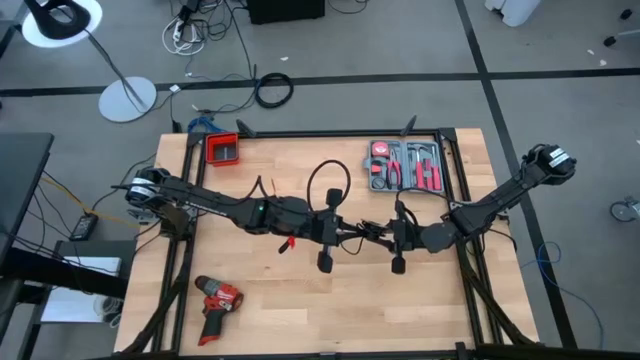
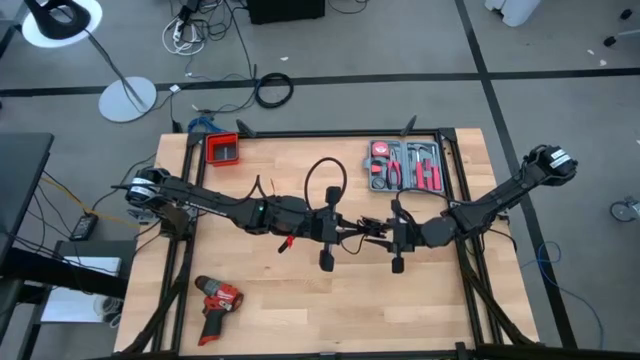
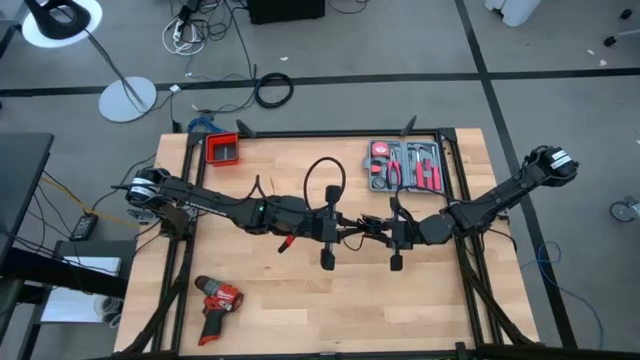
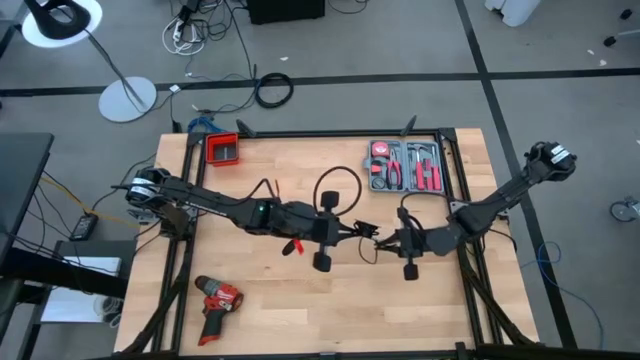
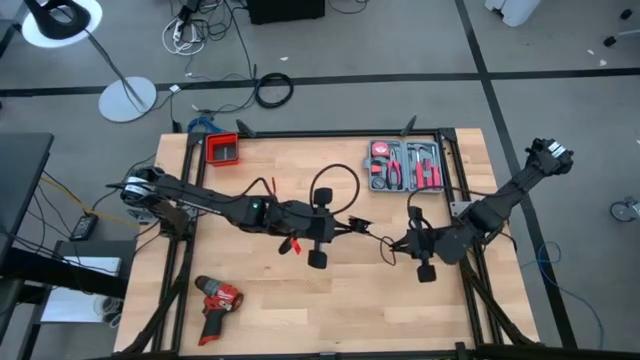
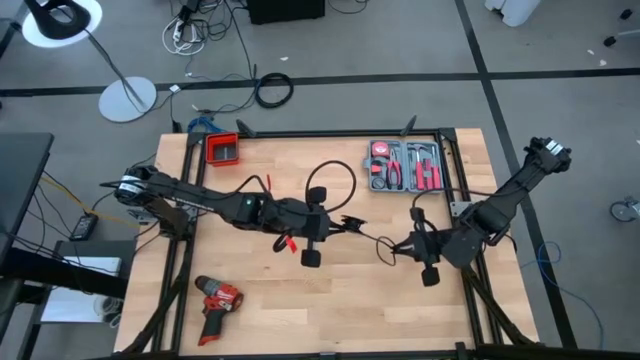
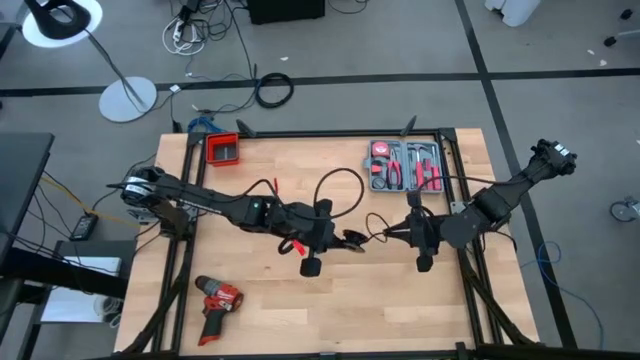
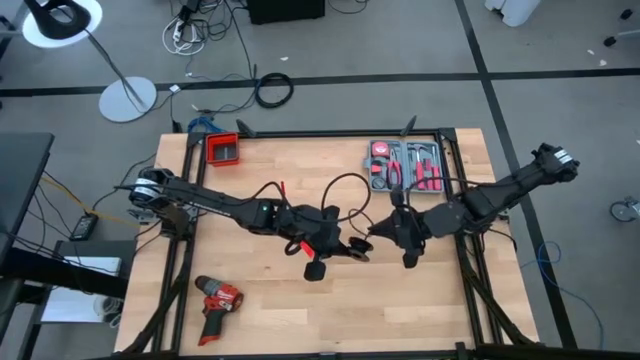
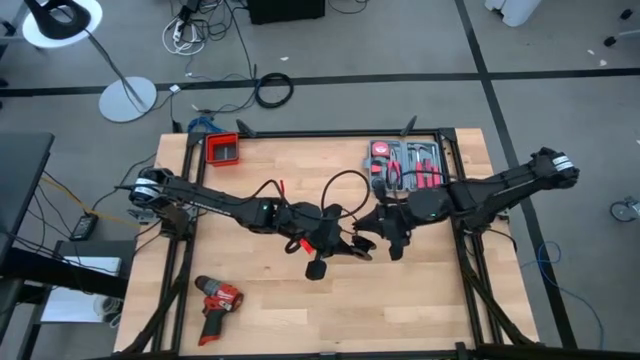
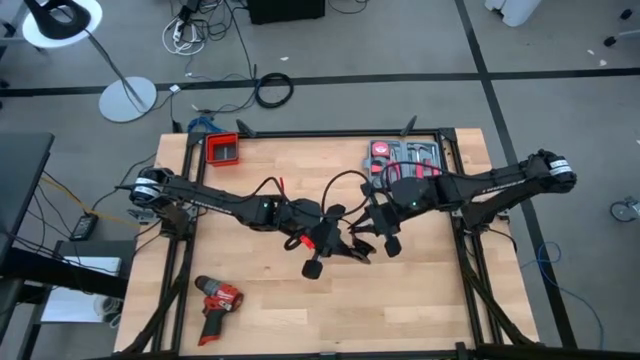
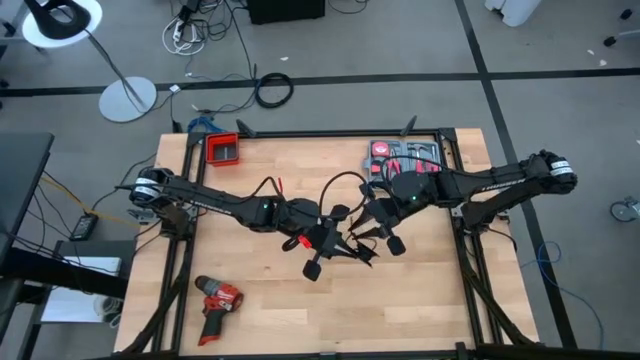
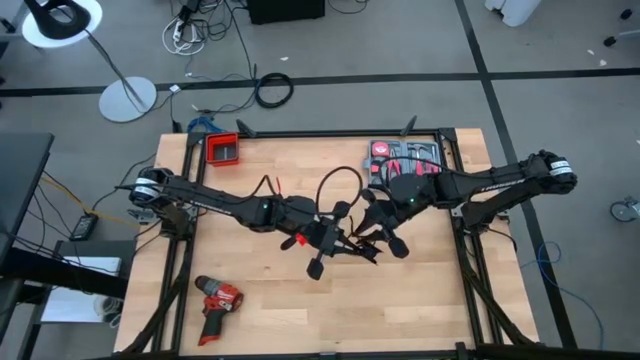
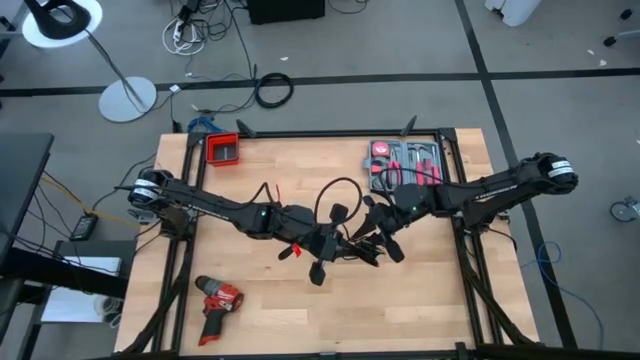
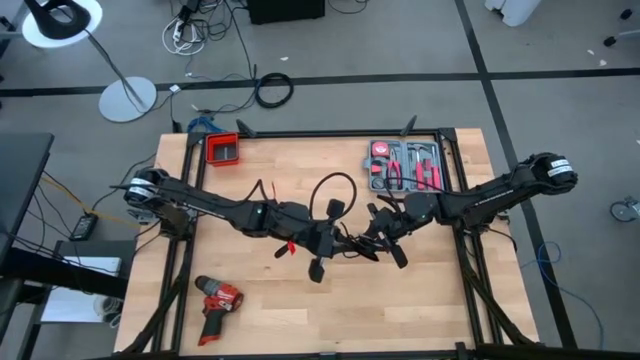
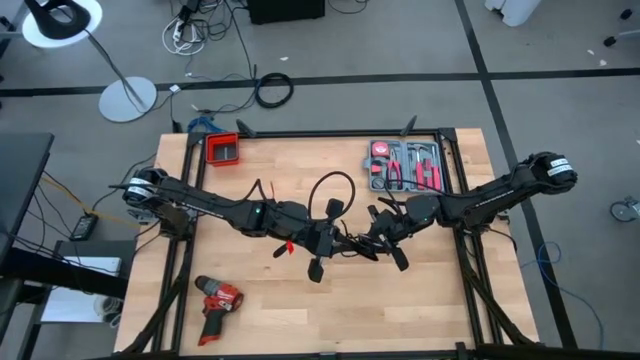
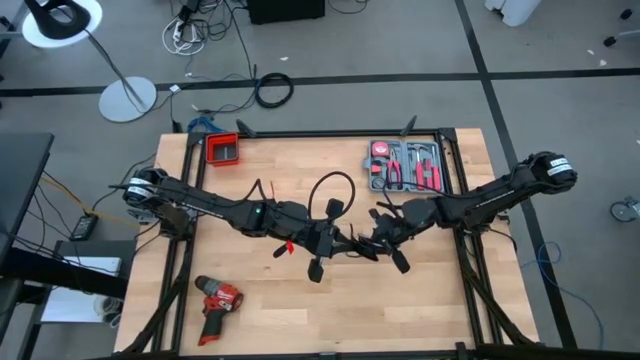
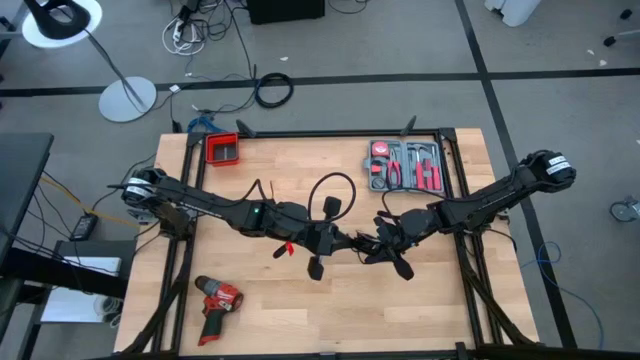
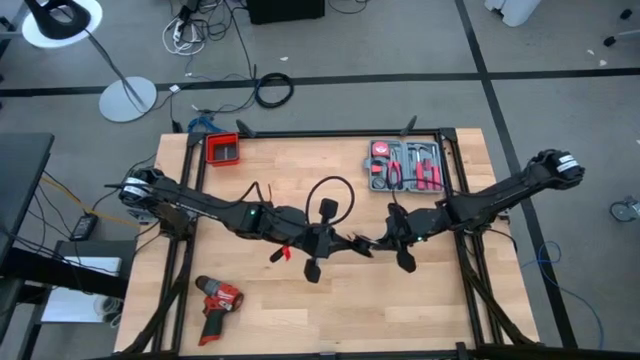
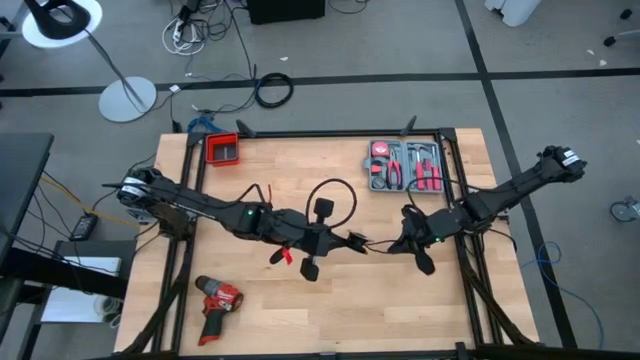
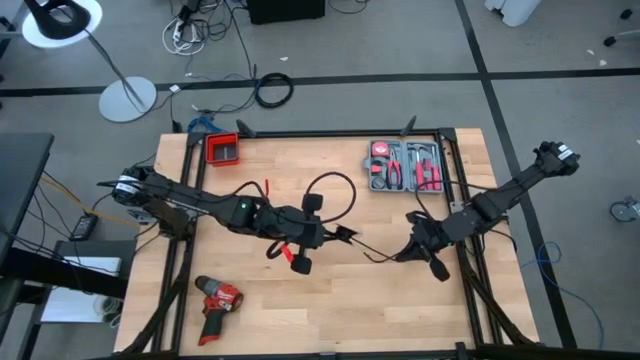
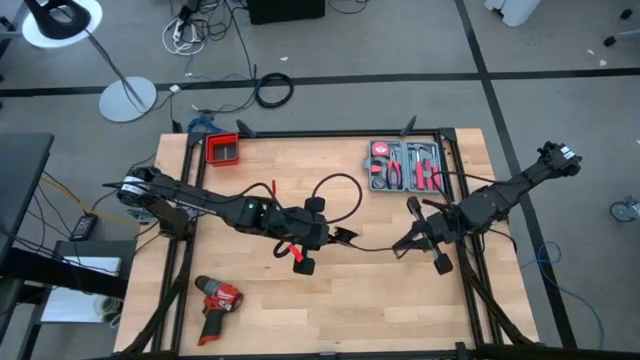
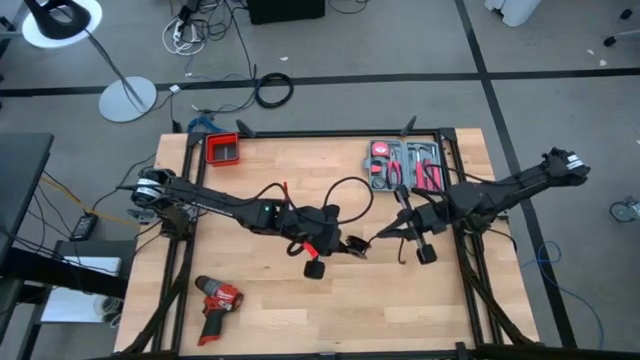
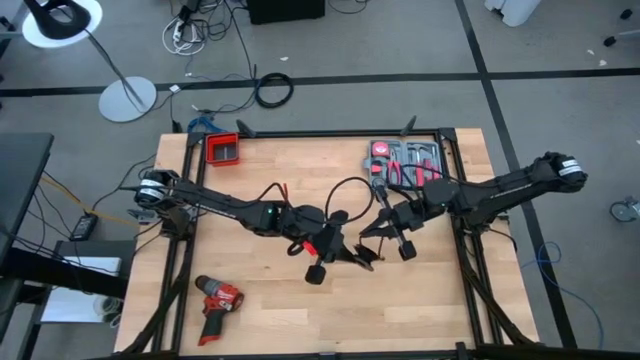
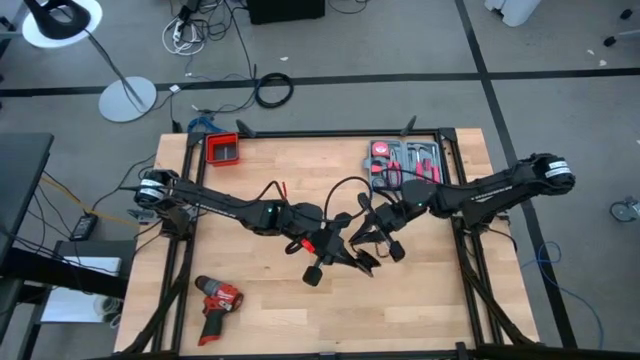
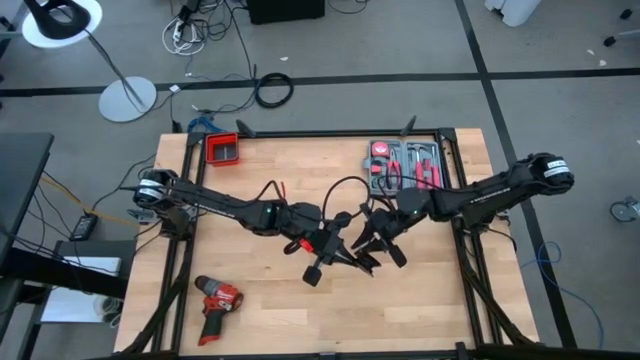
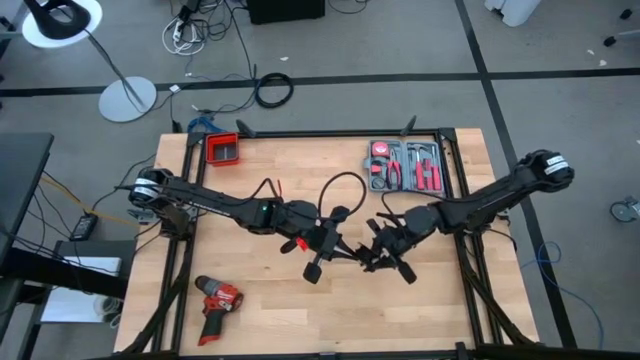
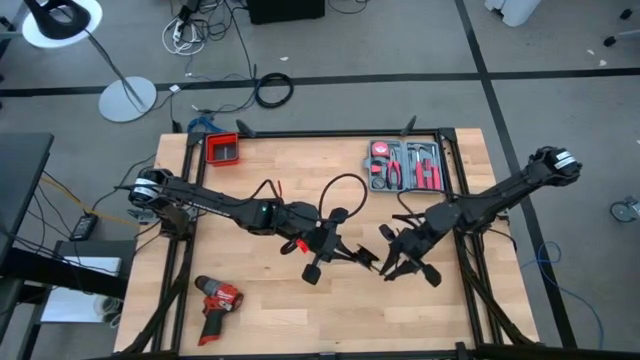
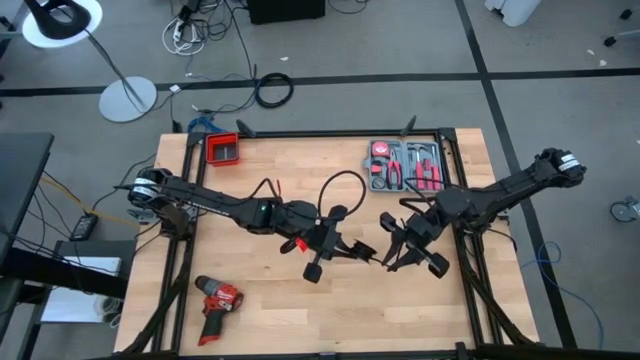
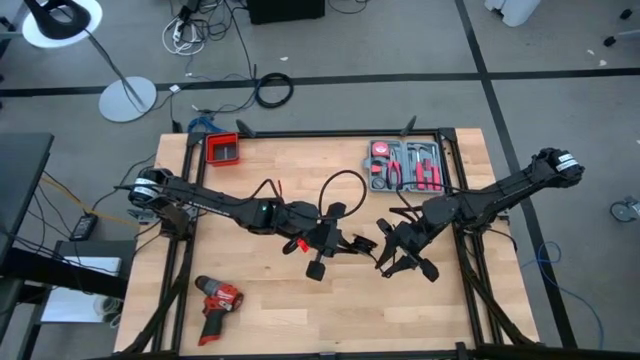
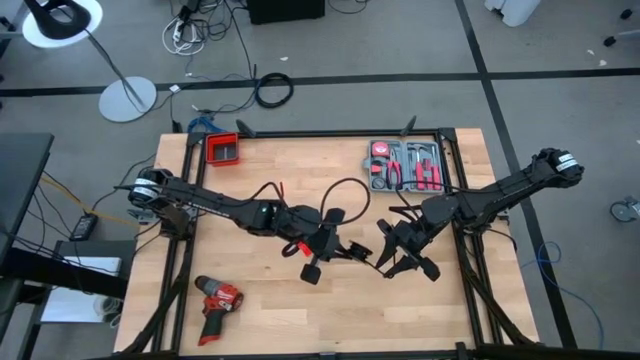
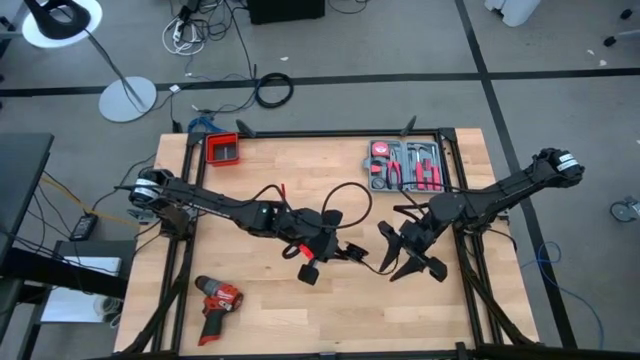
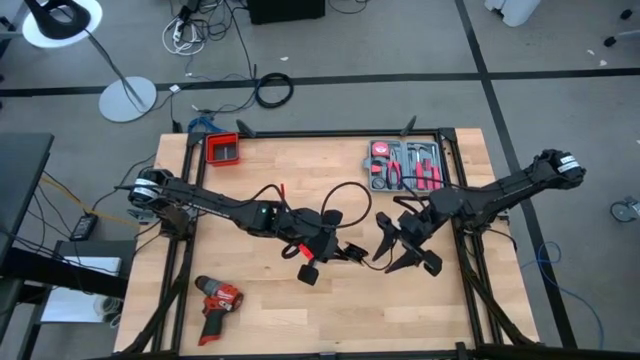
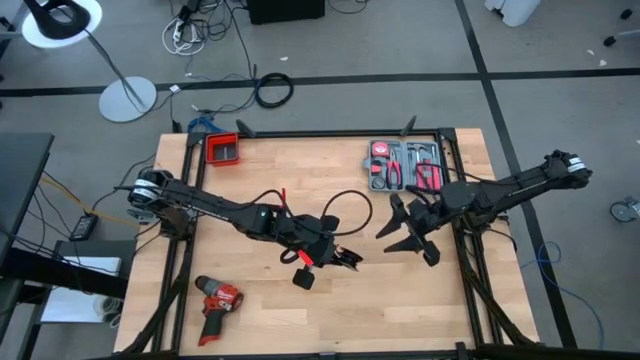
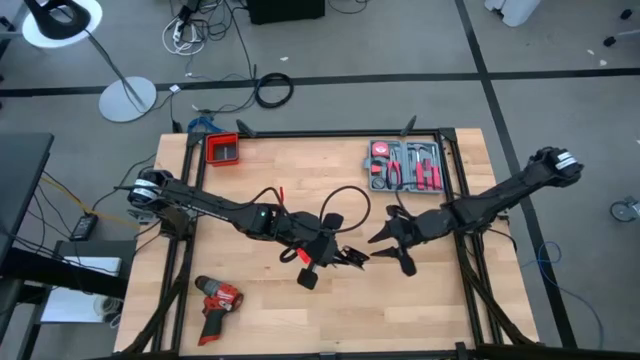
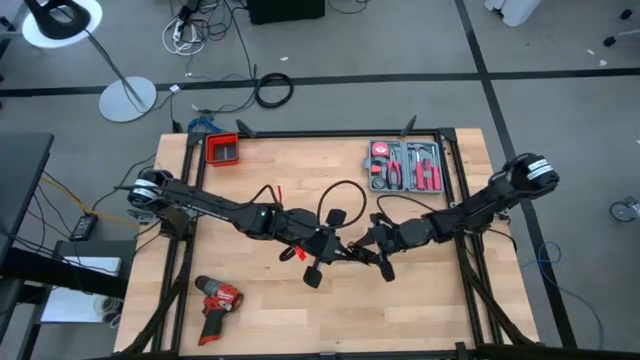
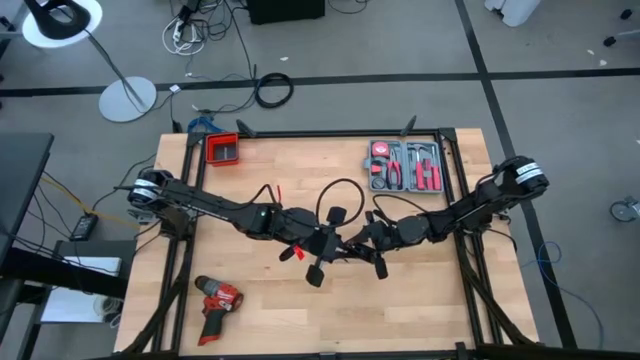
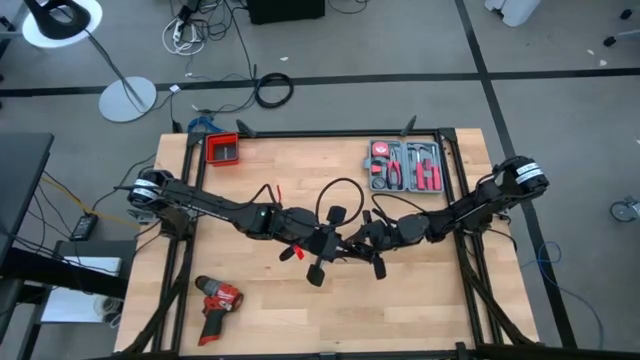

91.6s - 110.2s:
Task: Coil cords
Coil the black wire onto the black spool

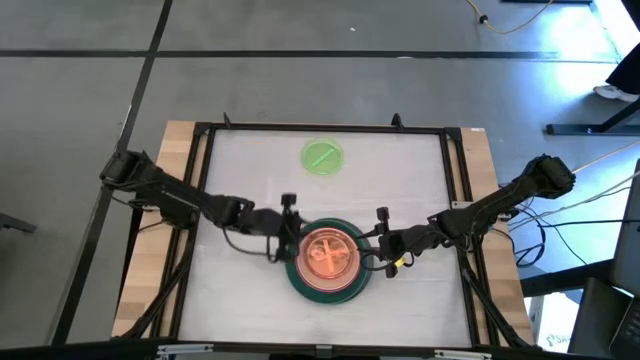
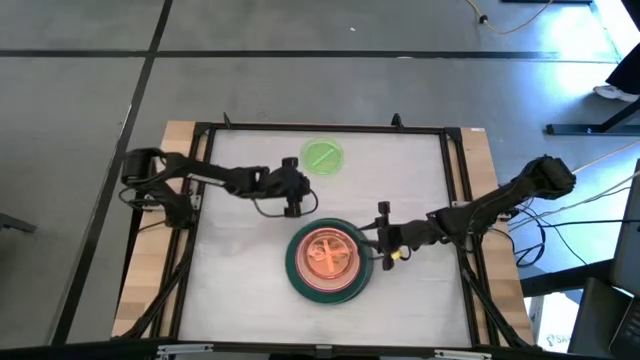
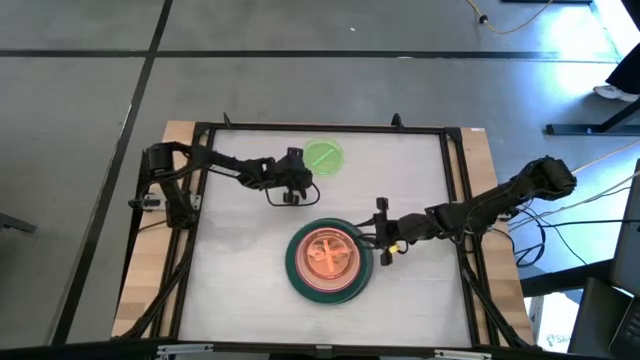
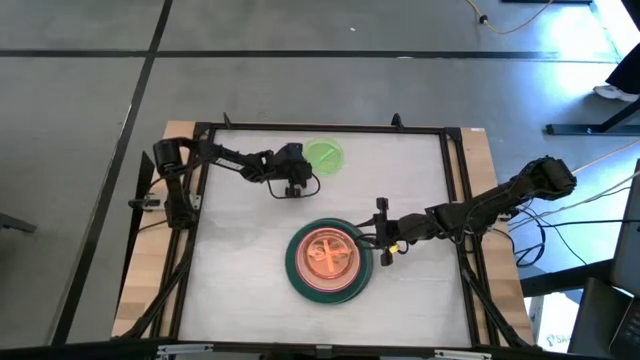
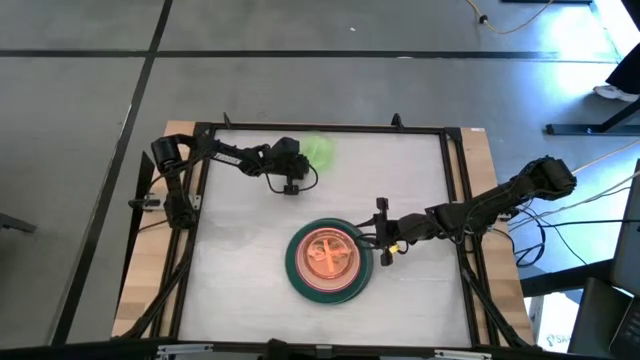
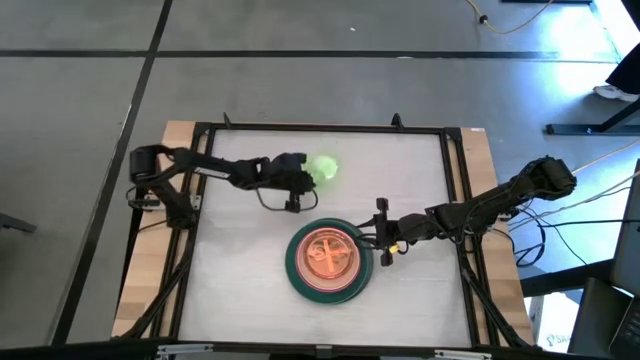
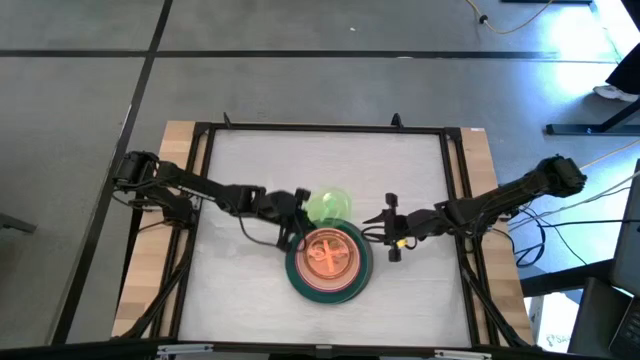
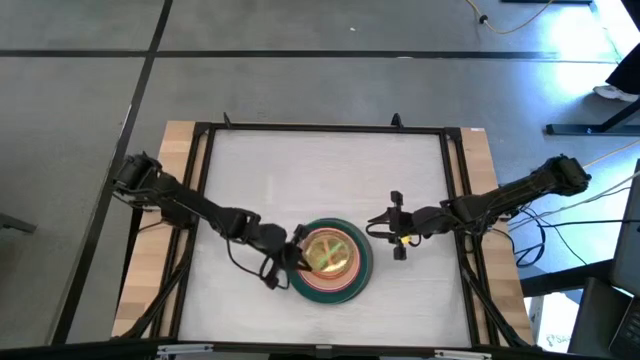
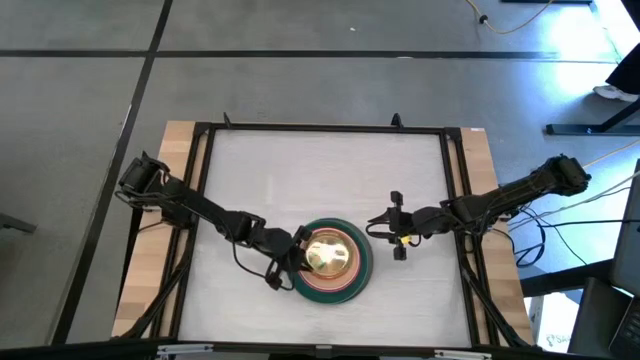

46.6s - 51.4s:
Task: Stack plastic plates
Stack the light green plate on top of the light orange plate
